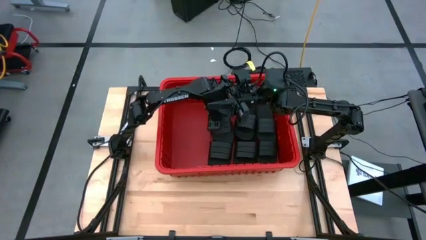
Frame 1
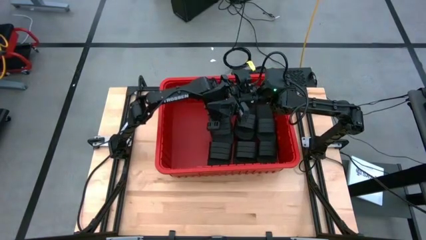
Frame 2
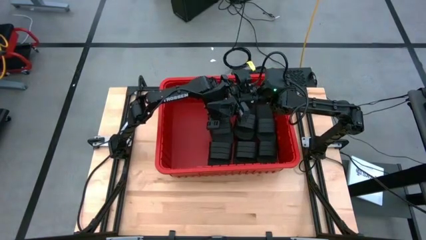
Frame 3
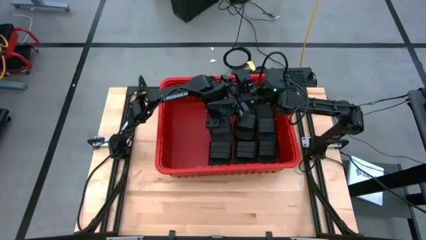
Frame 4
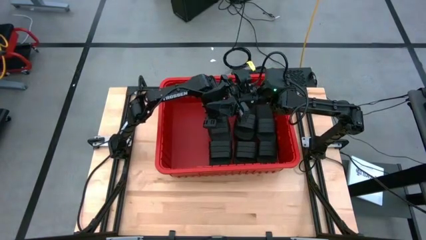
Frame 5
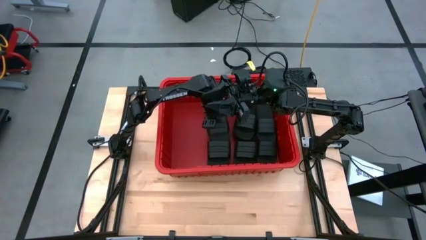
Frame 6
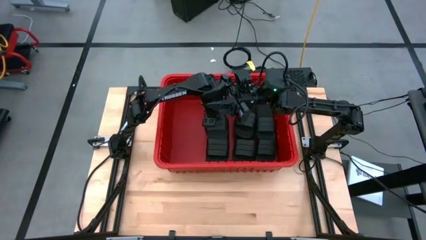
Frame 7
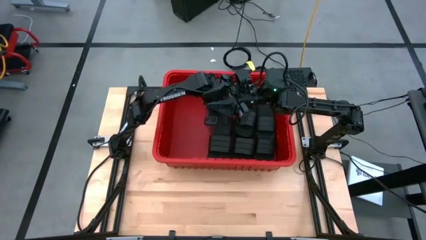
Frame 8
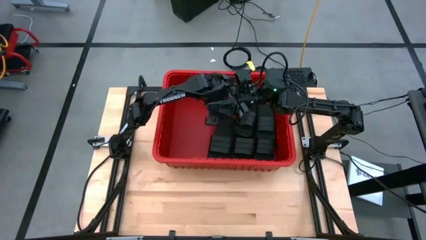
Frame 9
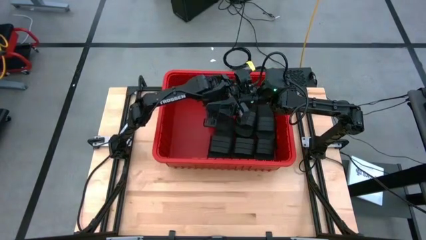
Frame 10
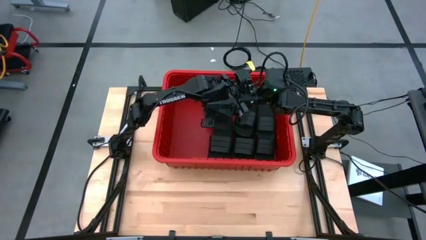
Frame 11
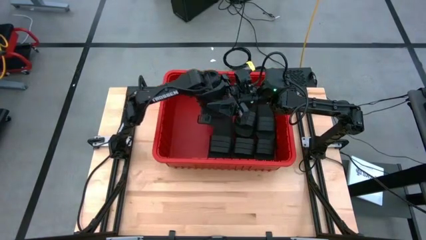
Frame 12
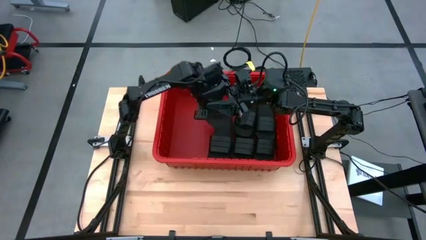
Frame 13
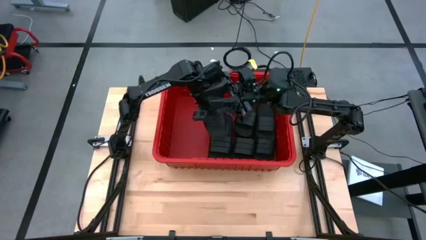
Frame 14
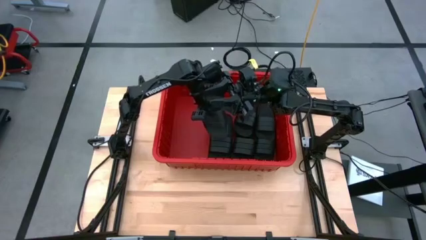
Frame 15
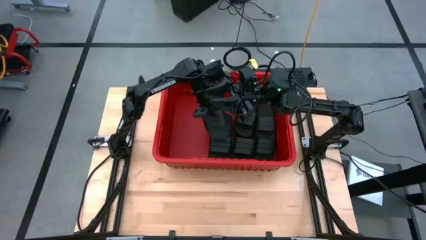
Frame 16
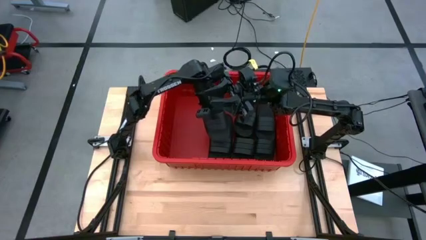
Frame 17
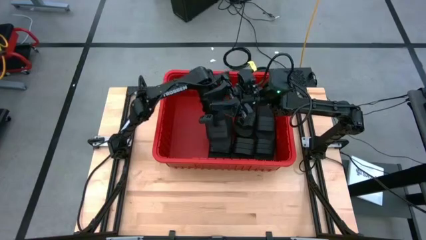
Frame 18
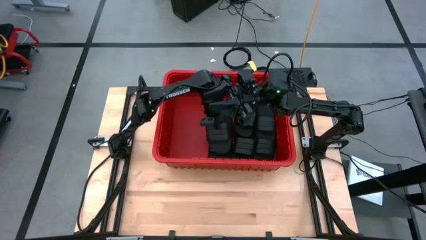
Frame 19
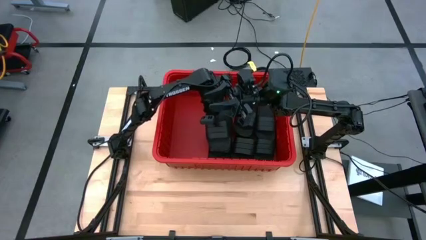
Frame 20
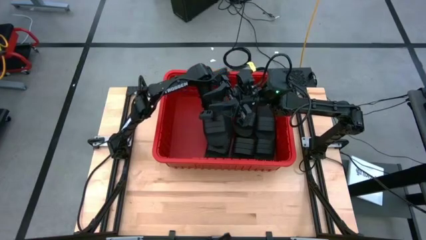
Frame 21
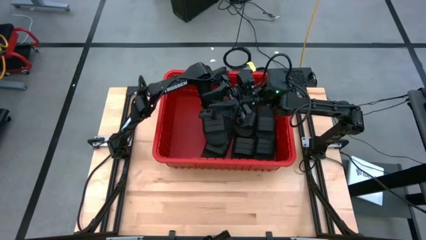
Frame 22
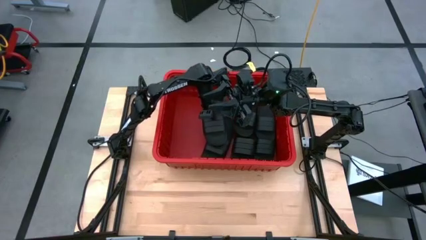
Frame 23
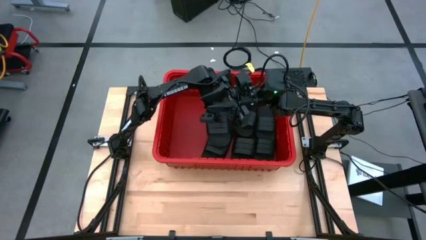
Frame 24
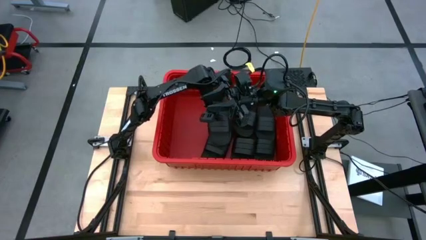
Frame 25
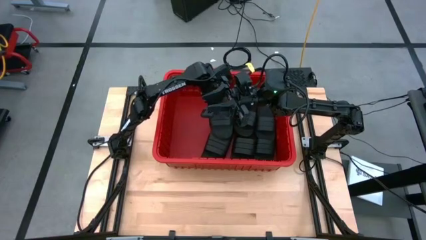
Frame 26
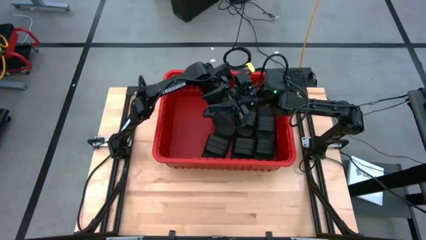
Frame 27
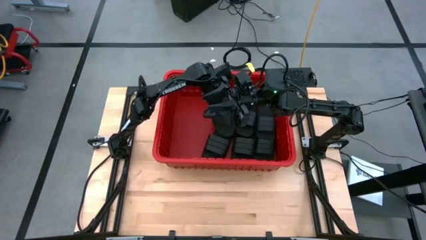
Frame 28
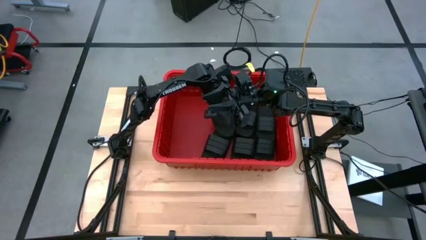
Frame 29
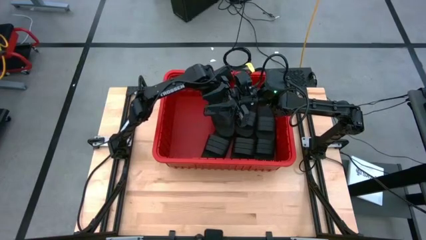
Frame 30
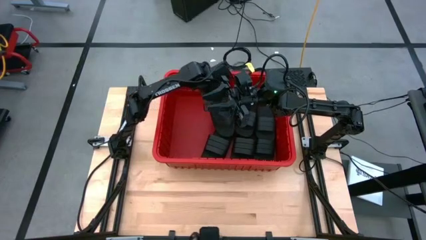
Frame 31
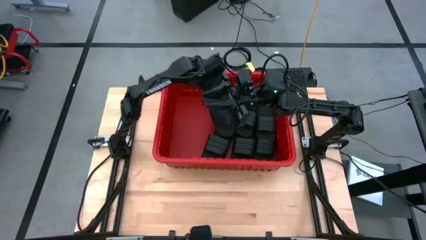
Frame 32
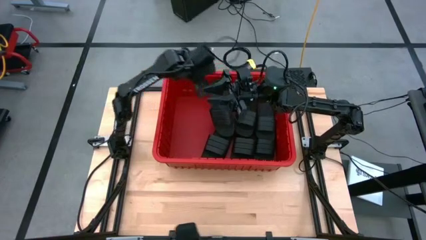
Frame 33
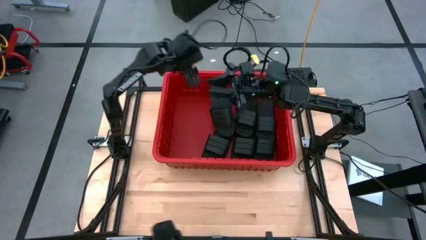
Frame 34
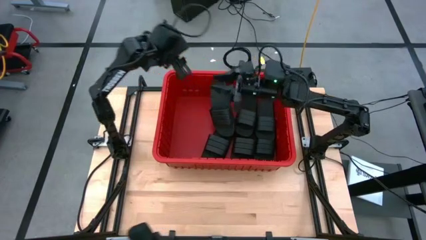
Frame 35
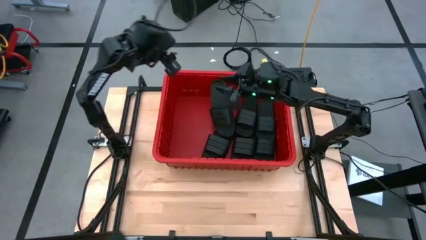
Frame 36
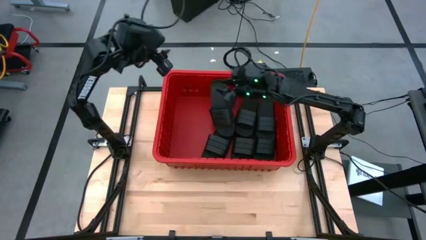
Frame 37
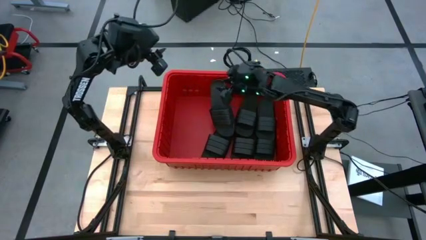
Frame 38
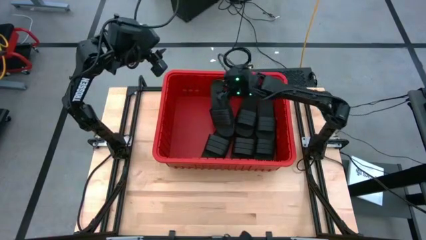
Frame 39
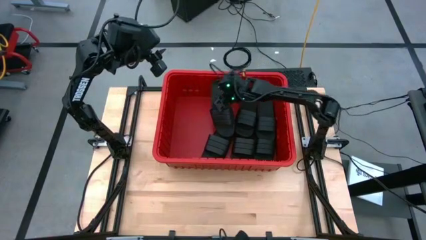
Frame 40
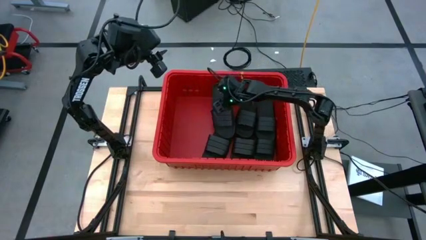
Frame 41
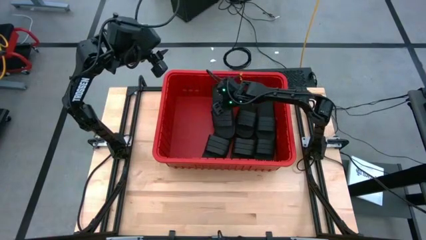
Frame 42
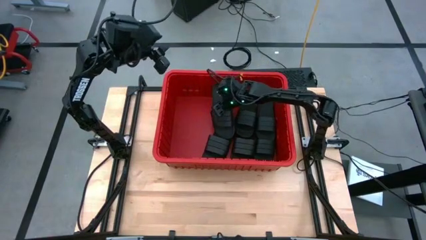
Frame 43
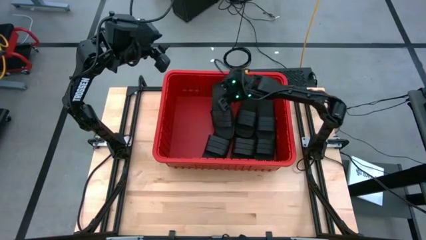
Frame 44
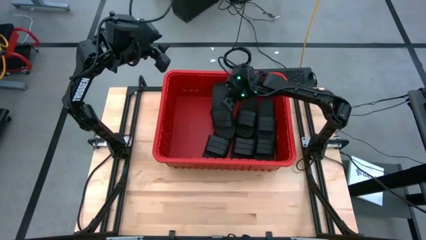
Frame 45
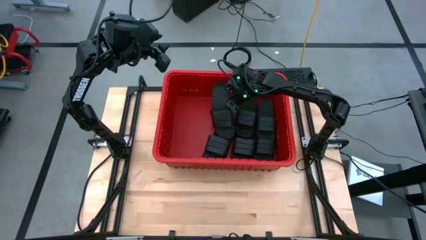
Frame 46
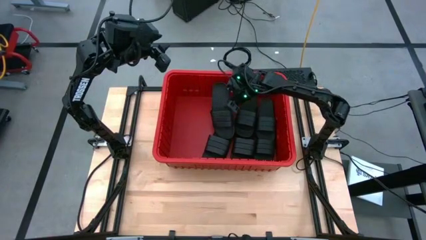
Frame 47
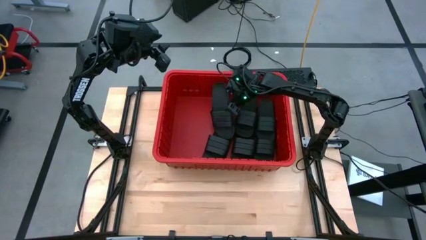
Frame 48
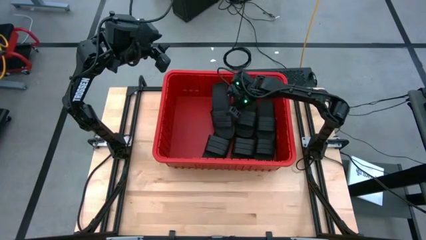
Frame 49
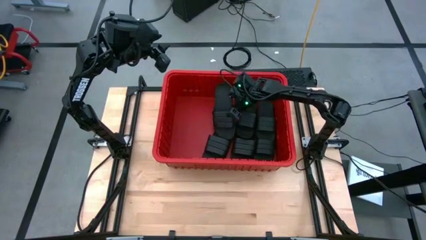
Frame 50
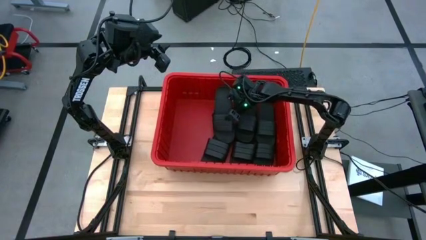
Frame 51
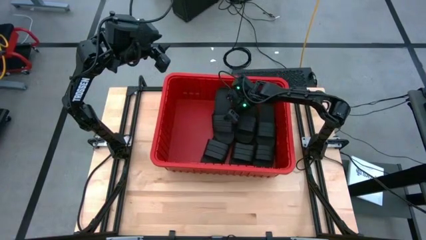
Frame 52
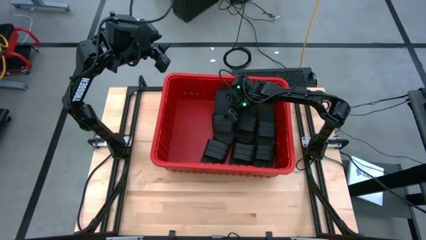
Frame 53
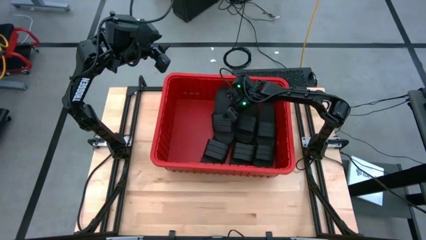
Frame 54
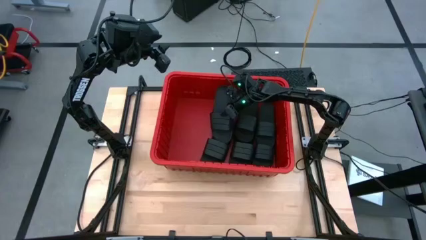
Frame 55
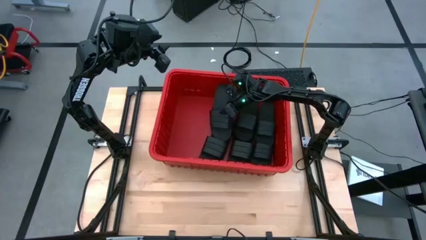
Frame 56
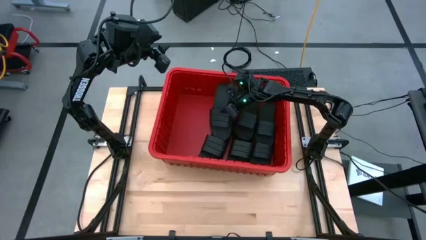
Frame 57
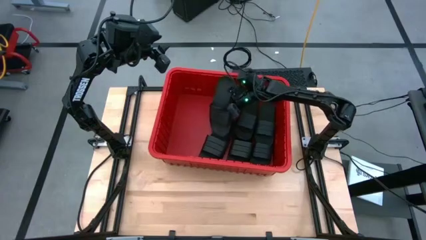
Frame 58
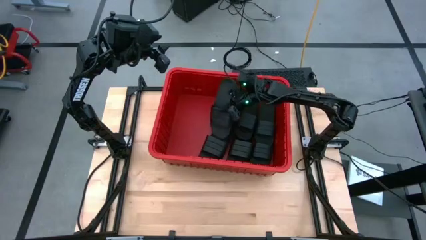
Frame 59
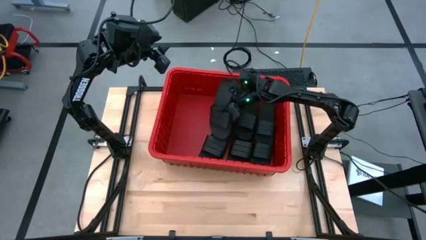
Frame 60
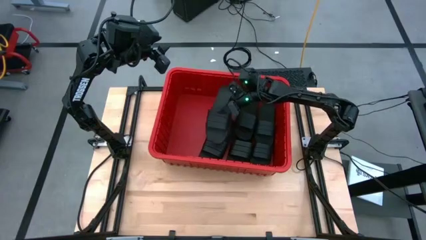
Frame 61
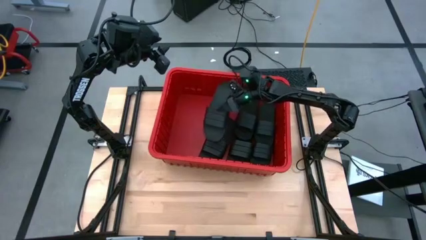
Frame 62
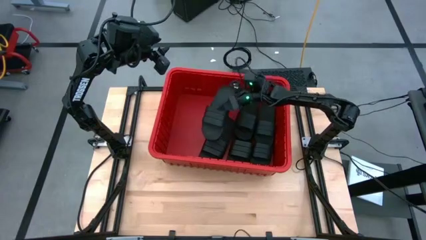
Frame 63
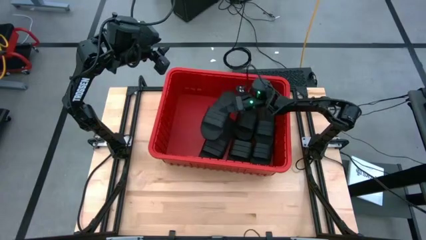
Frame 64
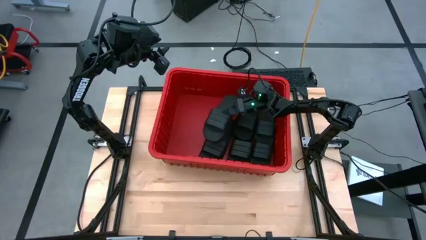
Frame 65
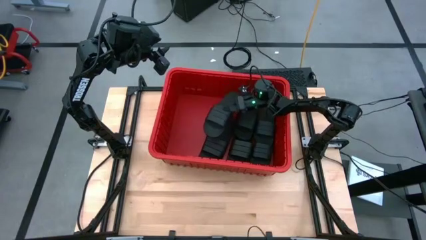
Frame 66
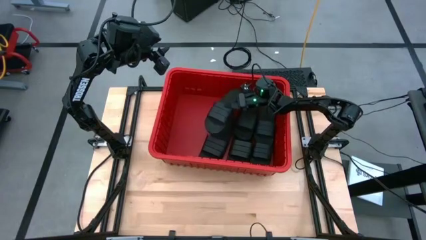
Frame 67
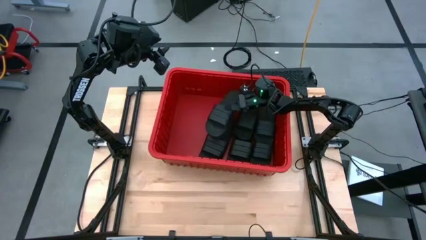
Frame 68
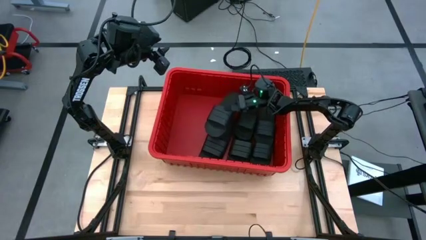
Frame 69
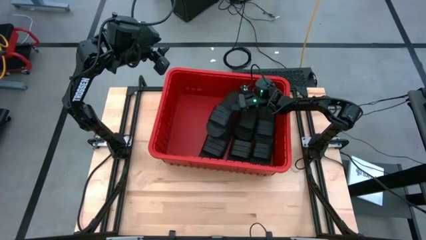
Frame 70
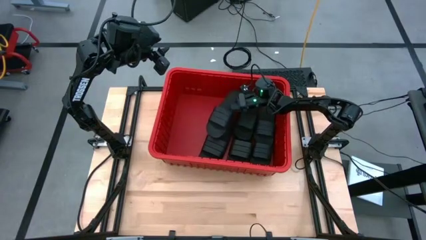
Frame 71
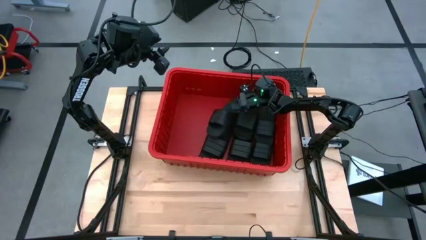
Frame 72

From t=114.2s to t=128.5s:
Task: Pick and place slides into bin
Put the black slide into the red bin

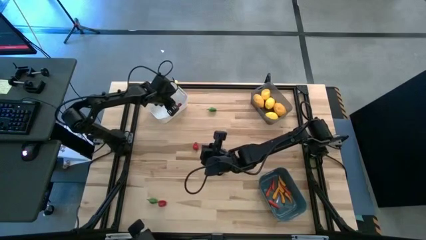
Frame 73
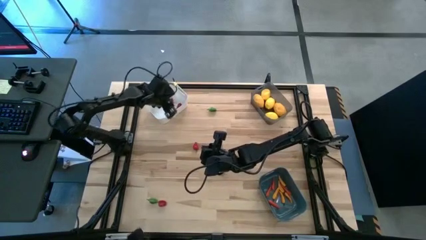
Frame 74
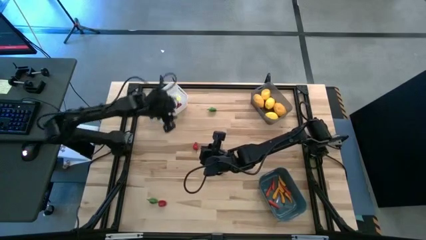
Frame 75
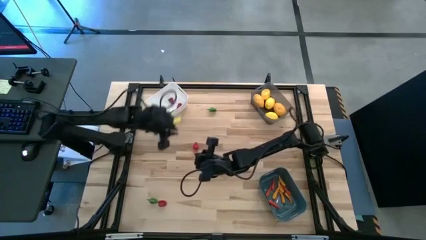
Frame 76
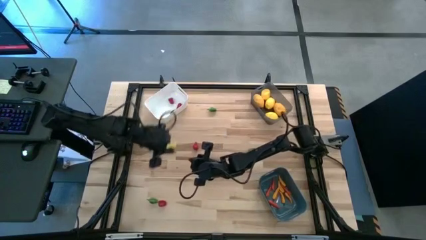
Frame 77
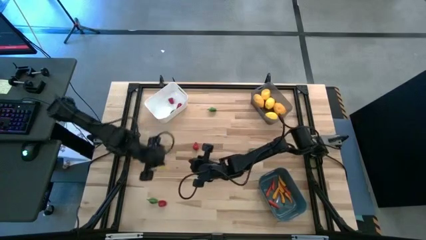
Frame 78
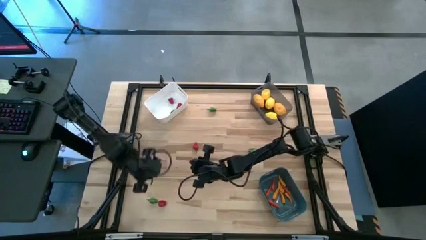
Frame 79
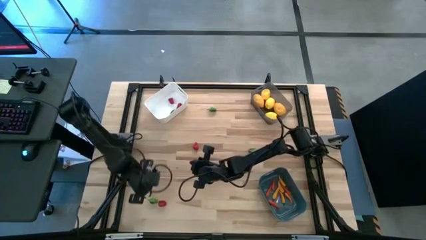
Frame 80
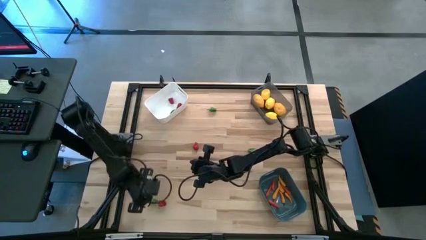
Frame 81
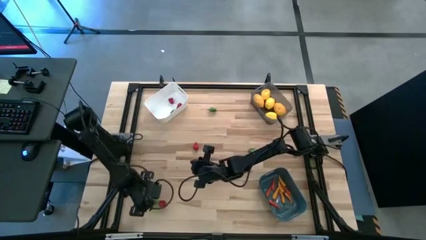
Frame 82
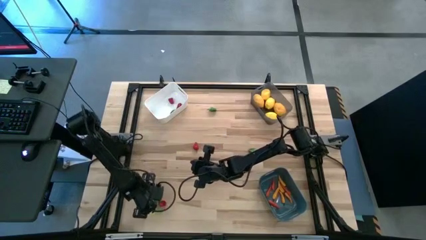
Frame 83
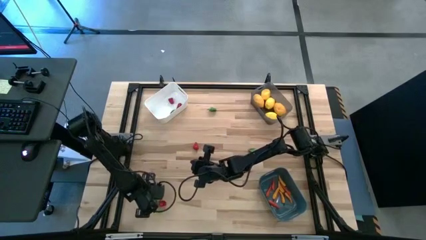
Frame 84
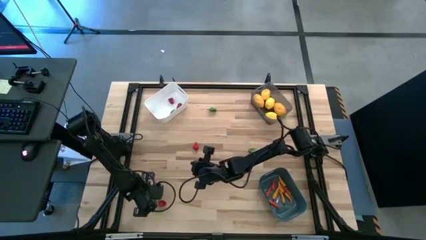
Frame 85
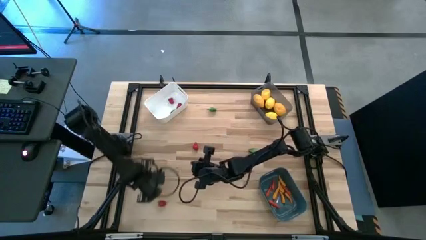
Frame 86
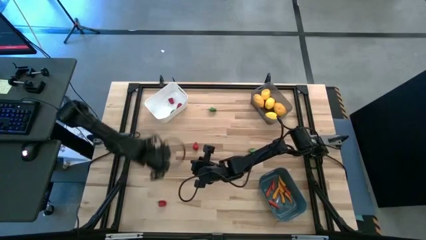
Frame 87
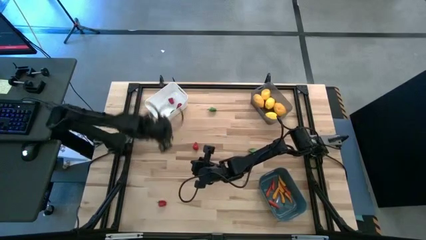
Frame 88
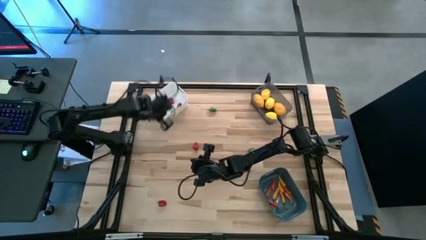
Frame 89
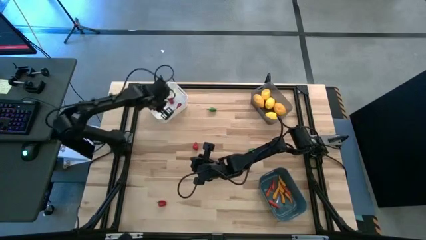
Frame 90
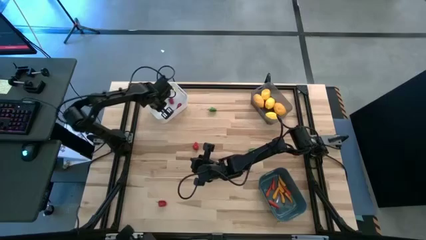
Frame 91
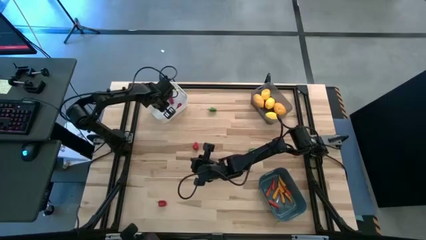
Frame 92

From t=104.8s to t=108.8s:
Task: Sort produce into baskets
Put the green chili pepper into the white bin
